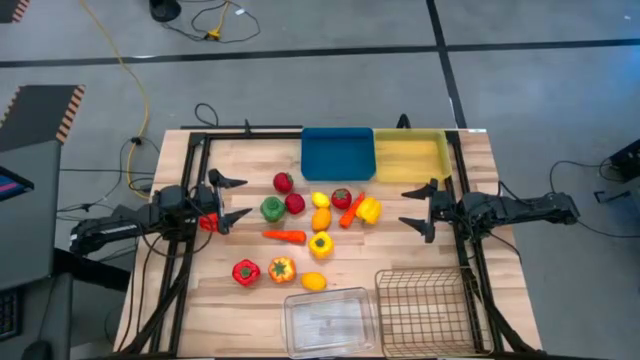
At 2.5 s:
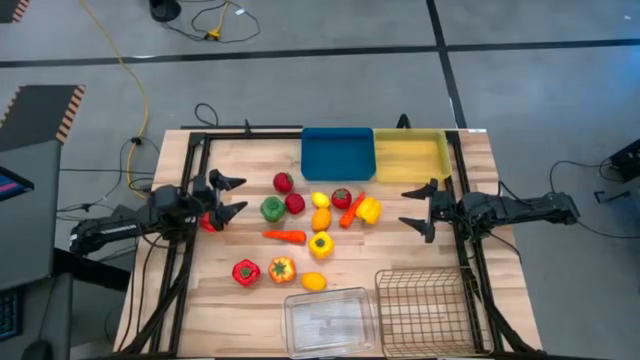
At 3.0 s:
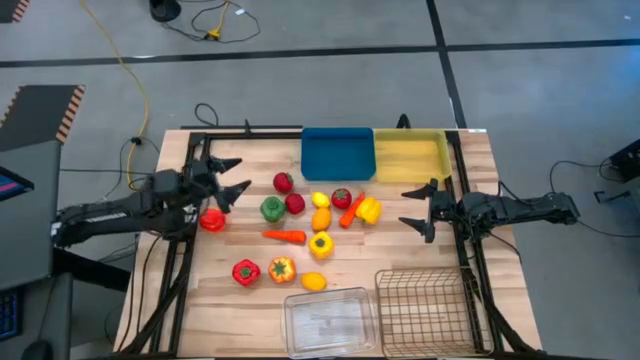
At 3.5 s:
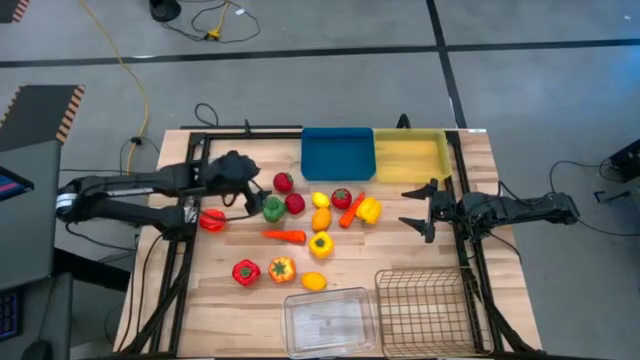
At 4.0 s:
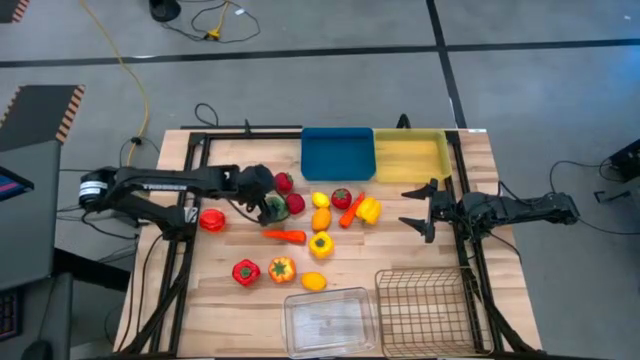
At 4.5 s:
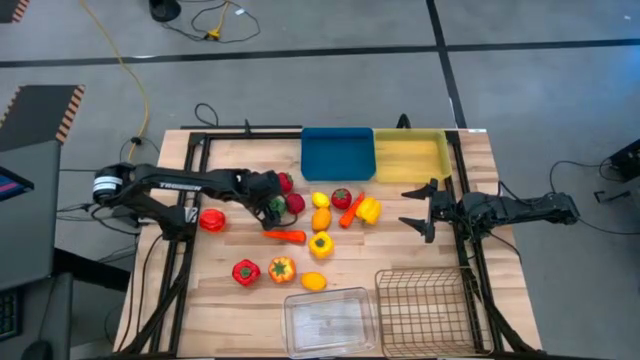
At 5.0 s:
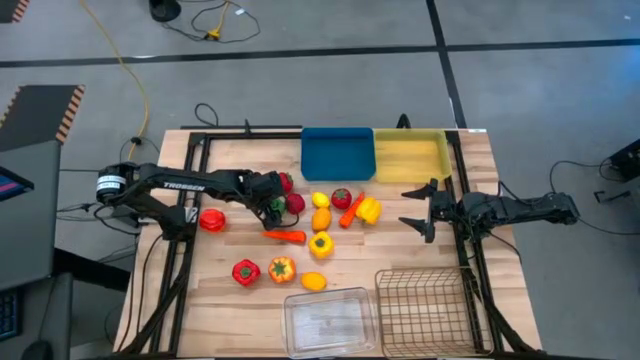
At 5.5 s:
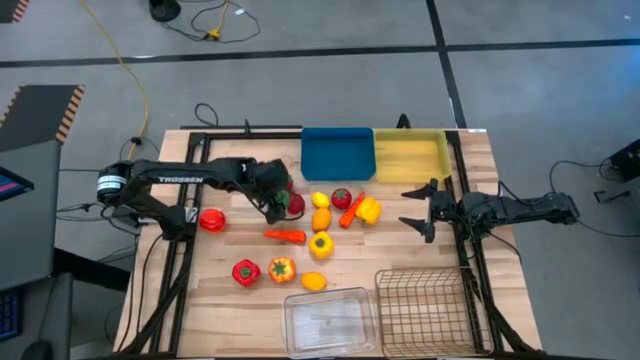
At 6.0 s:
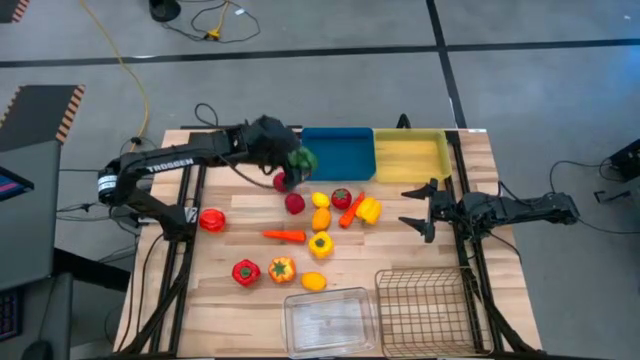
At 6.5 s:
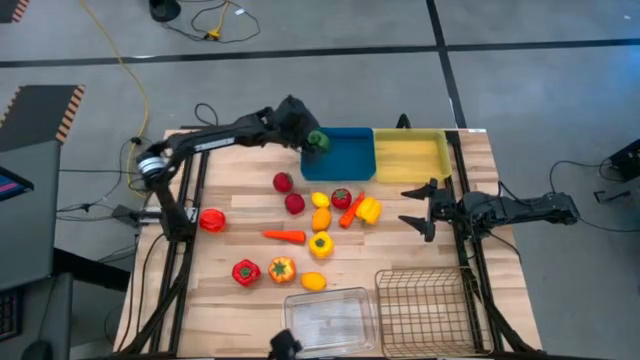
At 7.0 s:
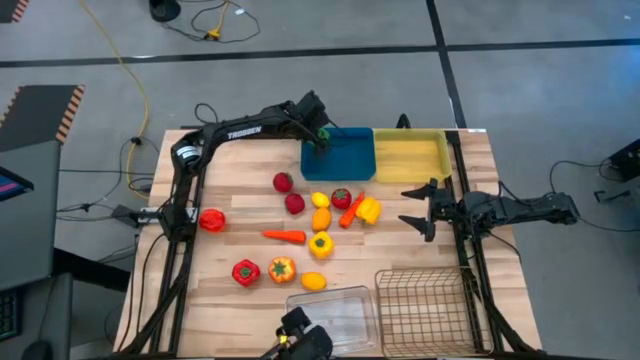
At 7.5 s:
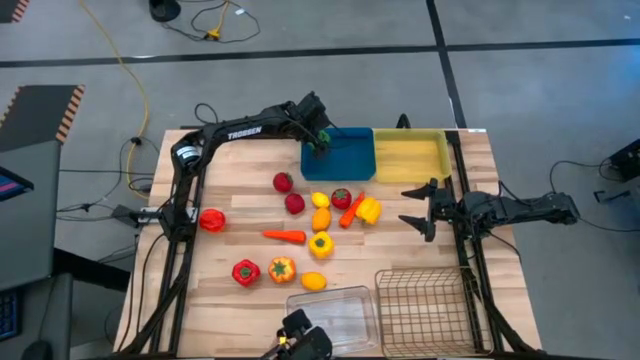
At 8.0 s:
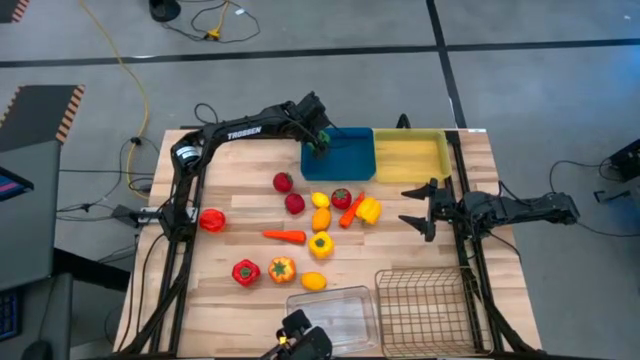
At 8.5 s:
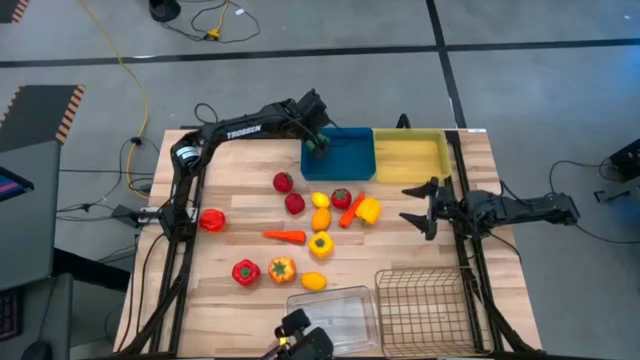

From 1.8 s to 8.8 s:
Task: Sort produce into baskets
Put the green bell pepper into the blue bin

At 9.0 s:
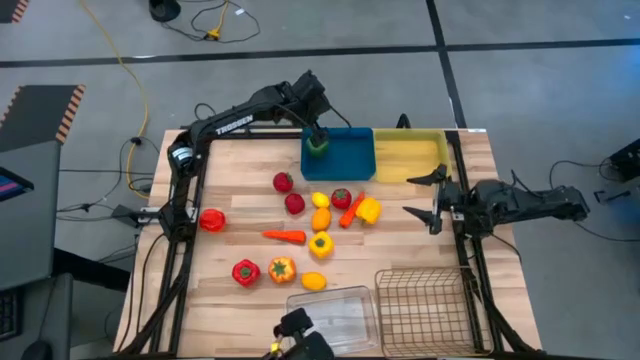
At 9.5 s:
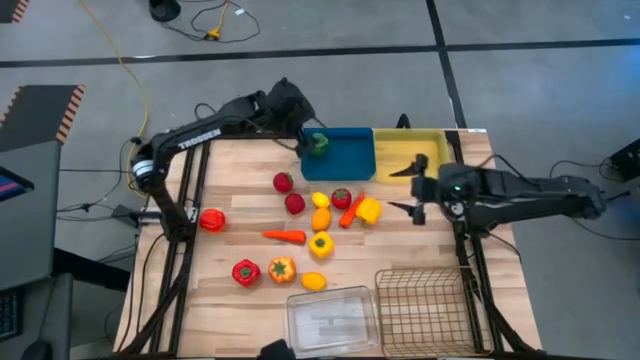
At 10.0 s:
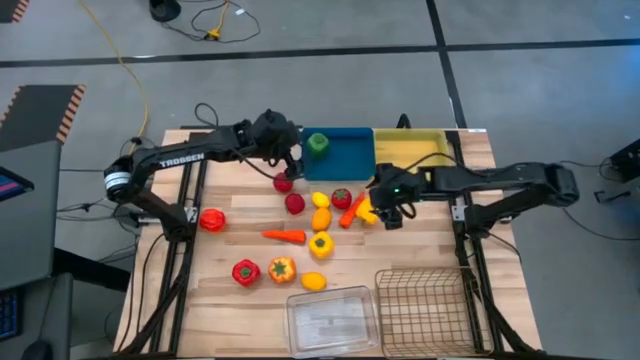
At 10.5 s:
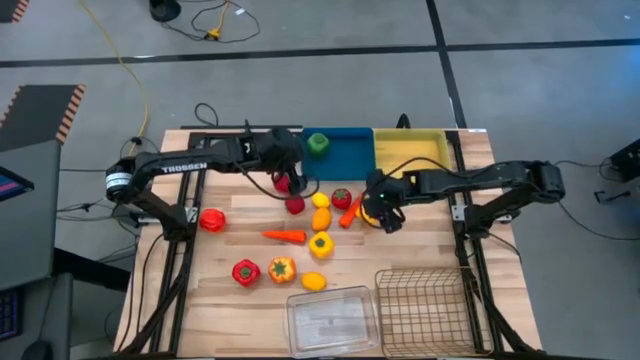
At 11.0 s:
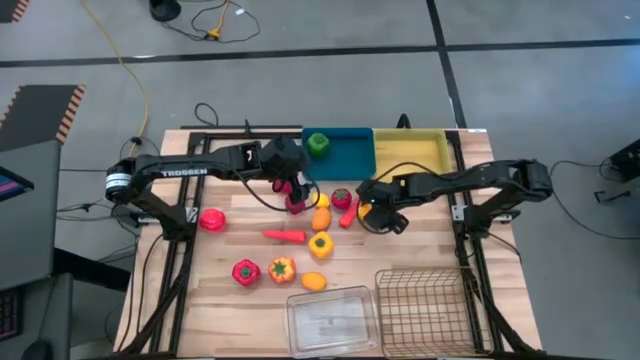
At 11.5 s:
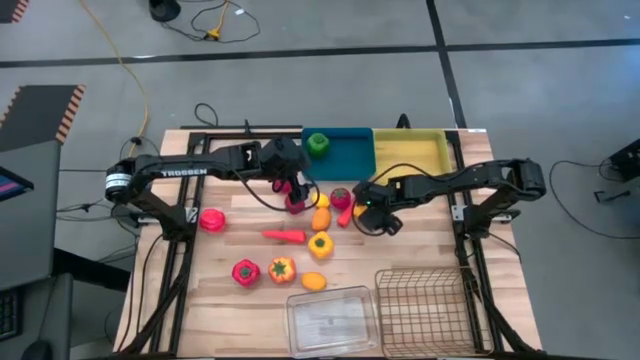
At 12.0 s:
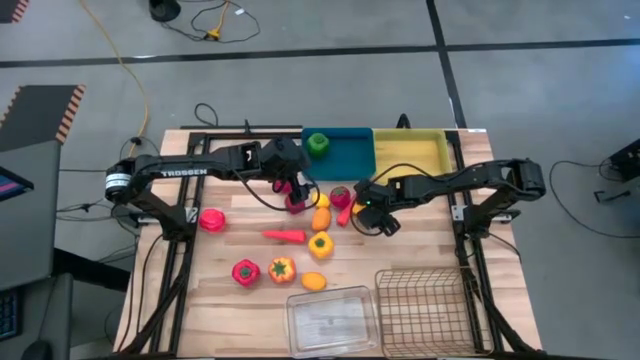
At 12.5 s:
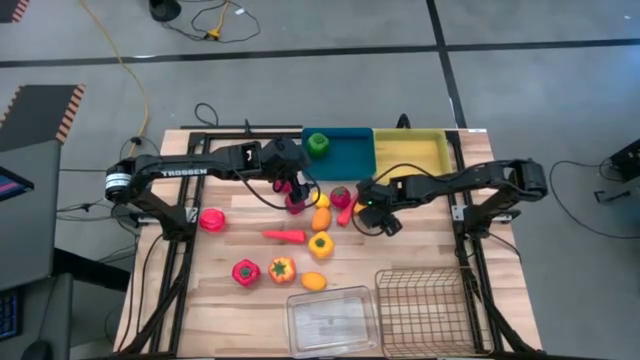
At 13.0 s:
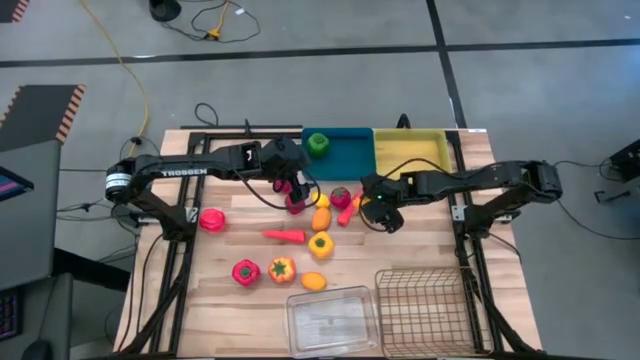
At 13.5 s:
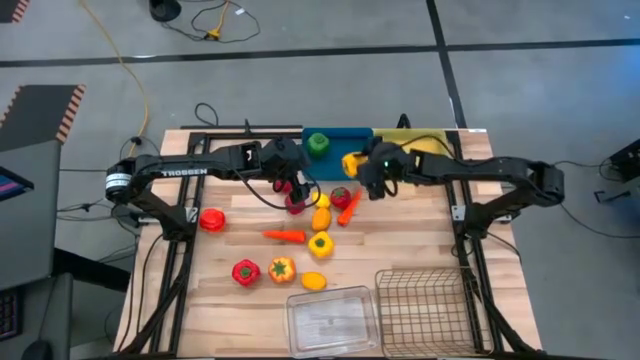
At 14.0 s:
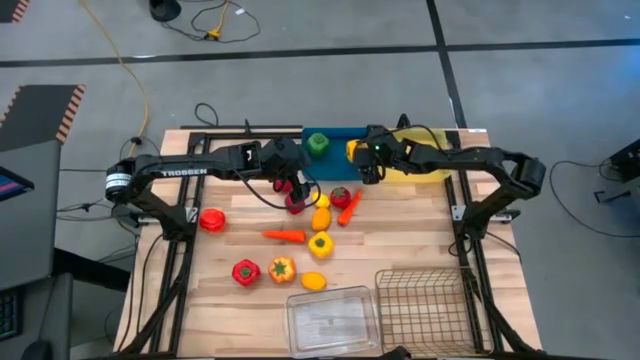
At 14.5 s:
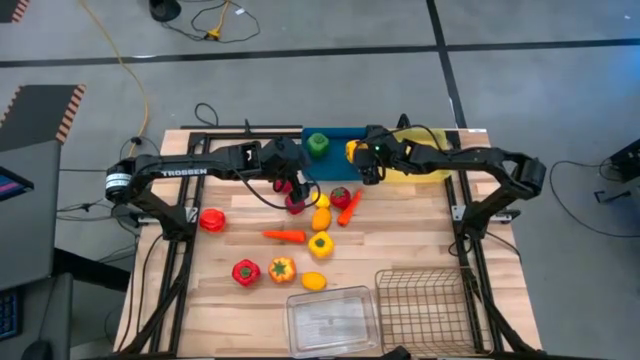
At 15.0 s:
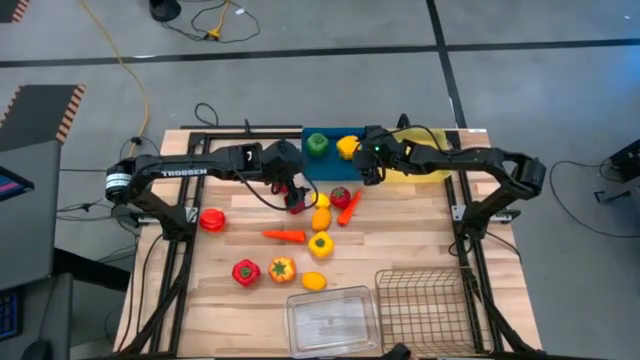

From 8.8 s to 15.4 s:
Put the yellow bell pepper into the blue bin

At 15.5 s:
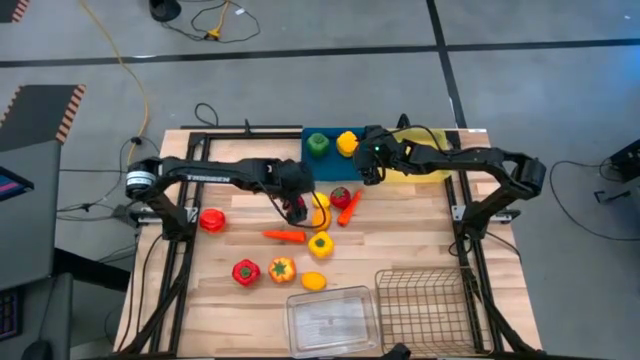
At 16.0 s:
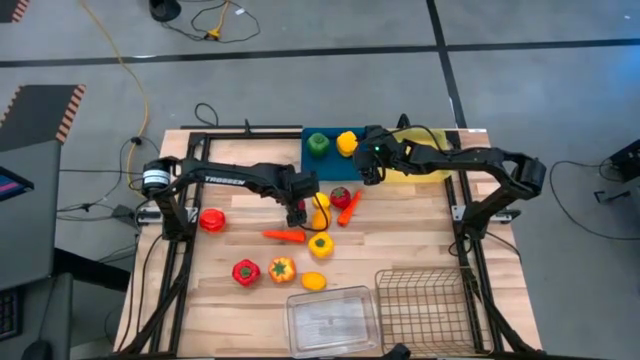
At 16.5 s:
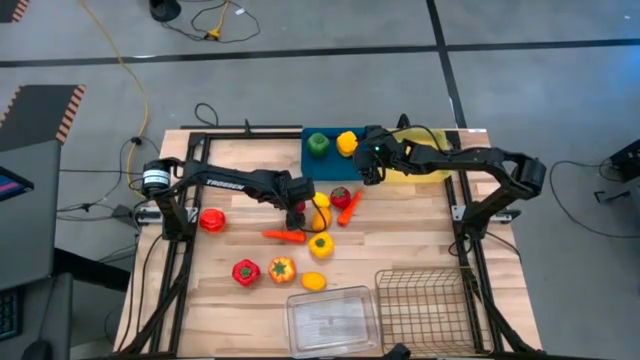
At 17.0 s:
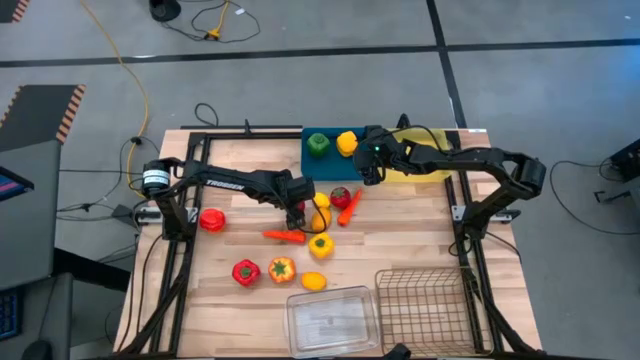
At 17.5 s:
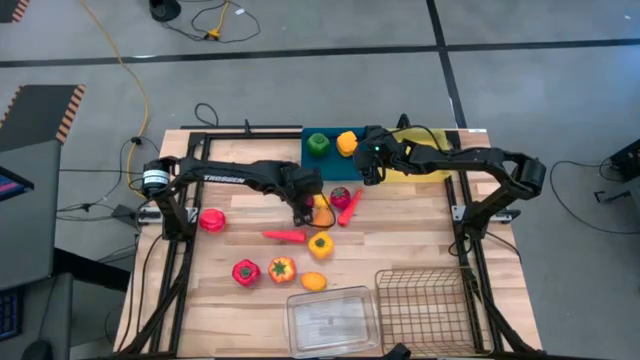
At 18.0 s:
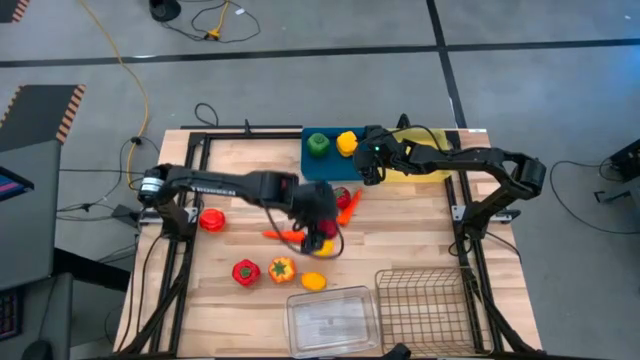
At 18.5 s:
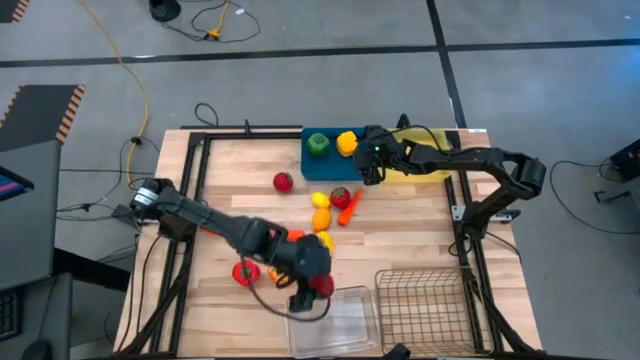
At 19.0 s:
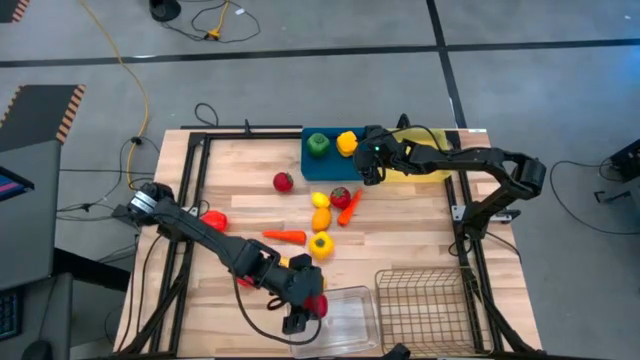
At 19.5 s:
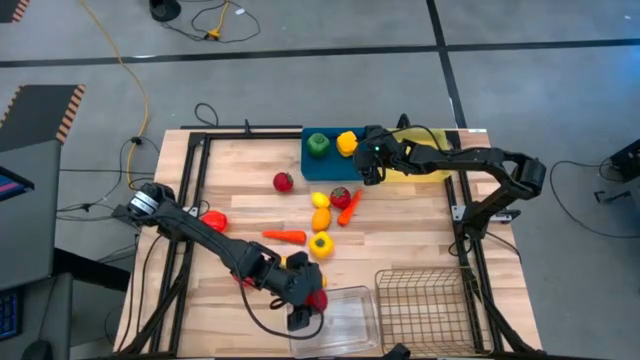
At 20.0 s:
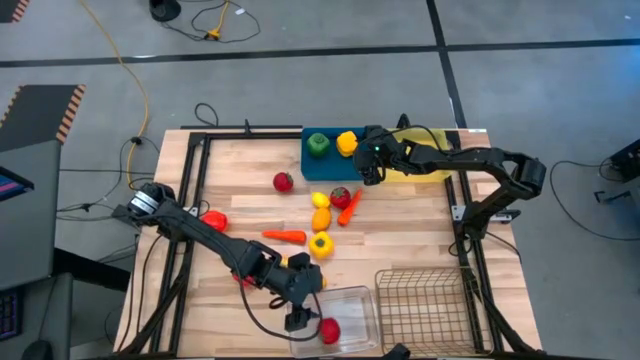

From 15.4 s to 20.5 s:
Put the red tomato into the transparent bin

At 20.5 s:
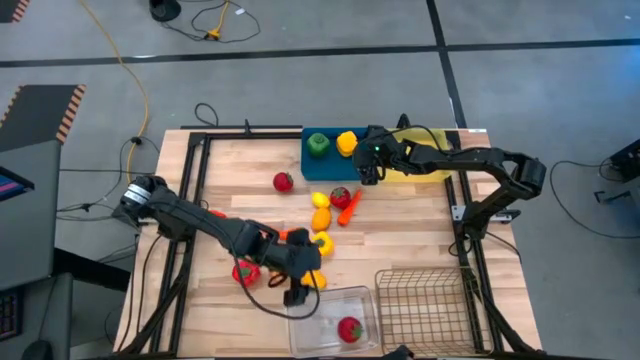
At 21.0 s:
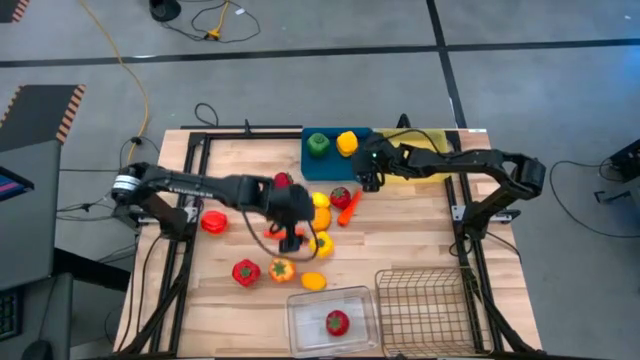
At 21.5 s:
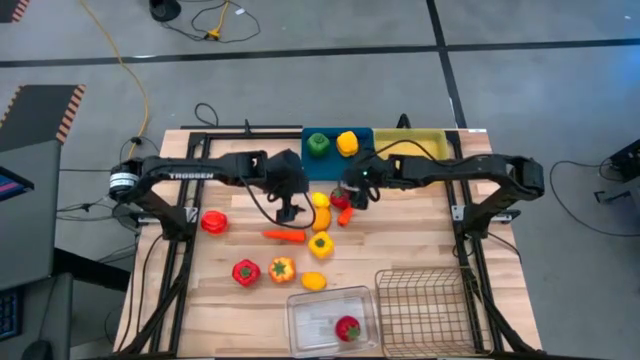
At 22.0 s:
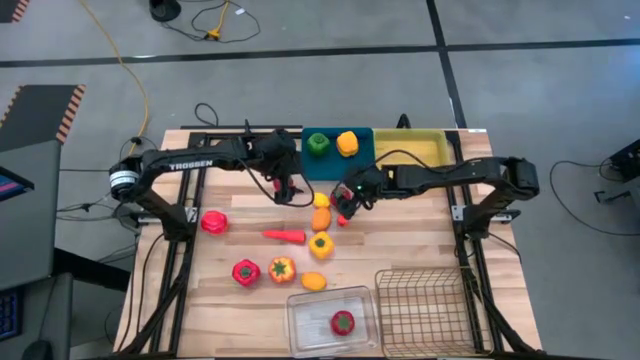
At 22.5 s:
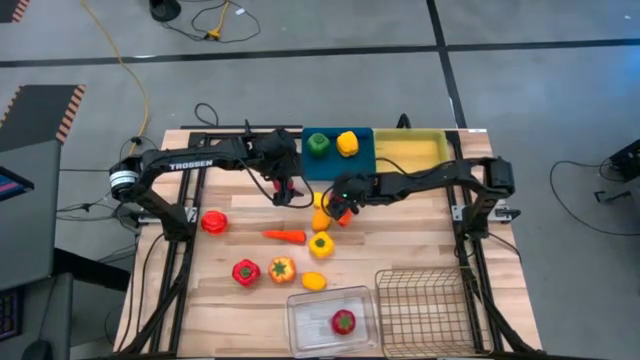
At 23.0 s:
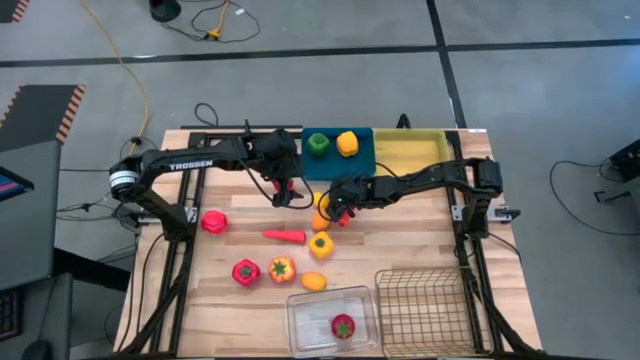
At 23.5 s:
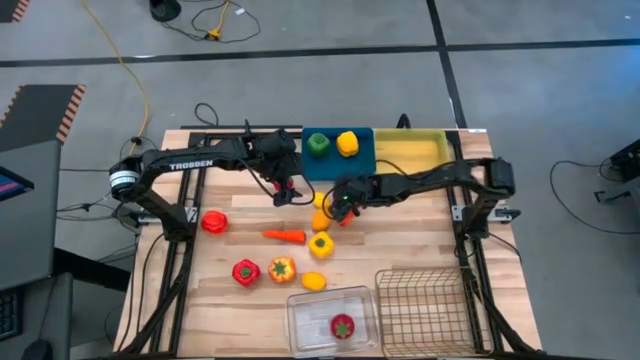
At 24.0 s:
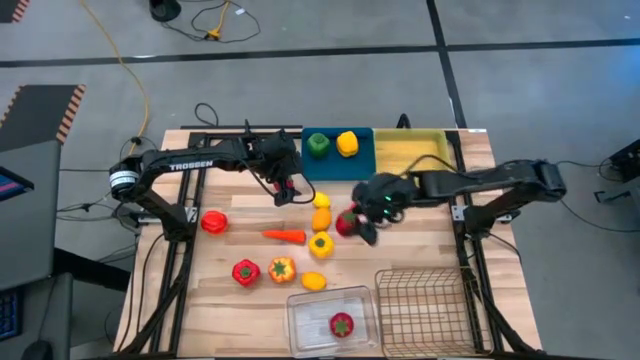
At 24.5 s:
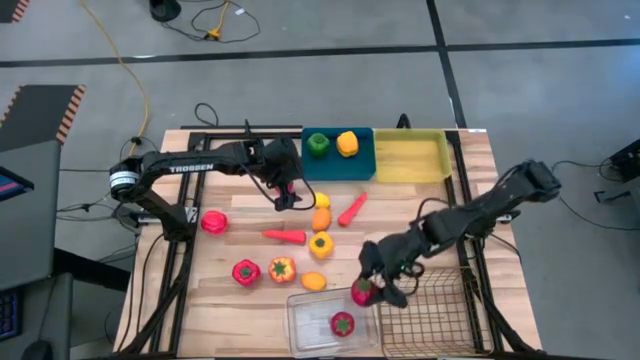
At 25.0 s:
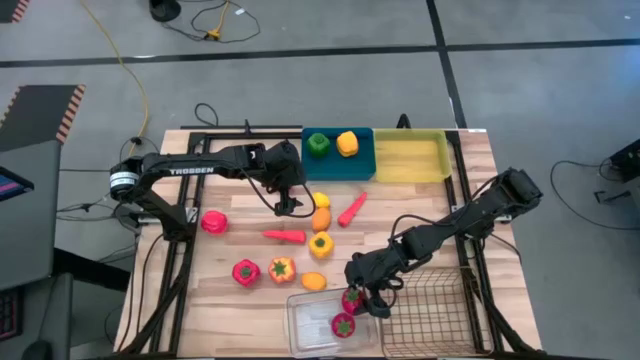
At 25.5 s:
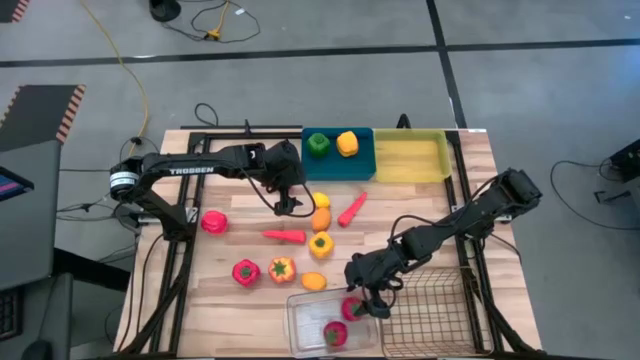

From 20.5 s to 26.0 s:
Put the red tomato into the transparent bin
